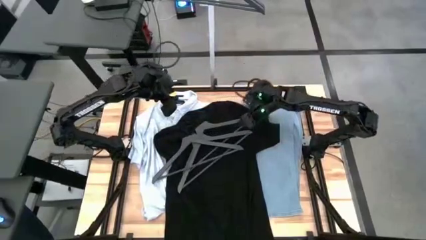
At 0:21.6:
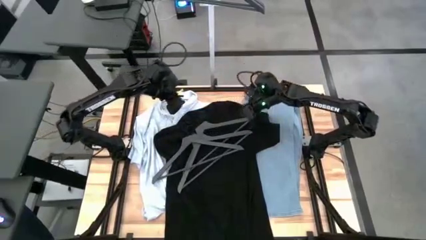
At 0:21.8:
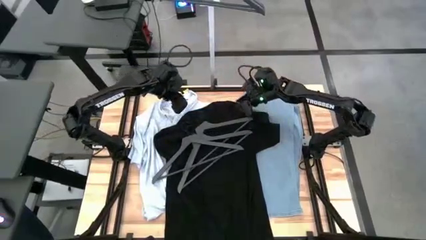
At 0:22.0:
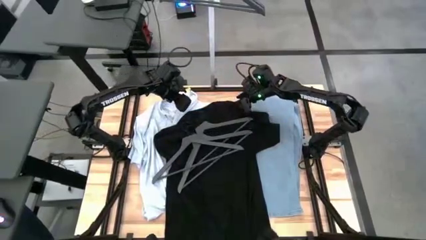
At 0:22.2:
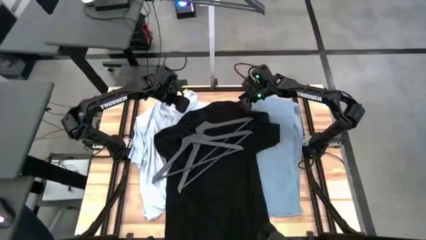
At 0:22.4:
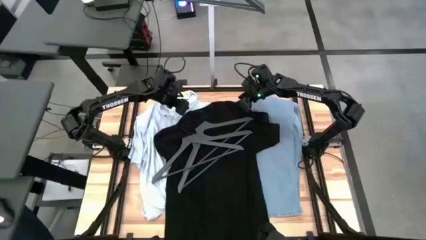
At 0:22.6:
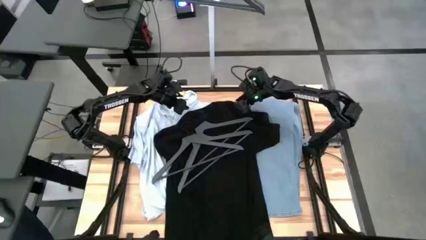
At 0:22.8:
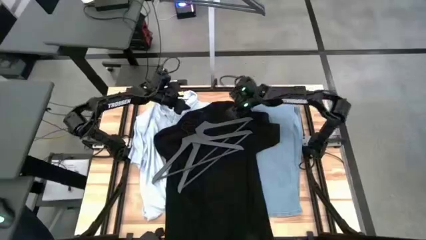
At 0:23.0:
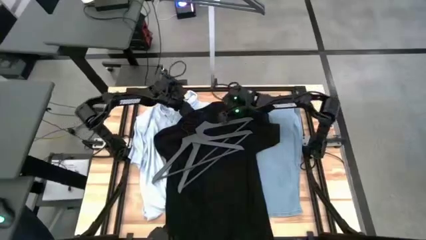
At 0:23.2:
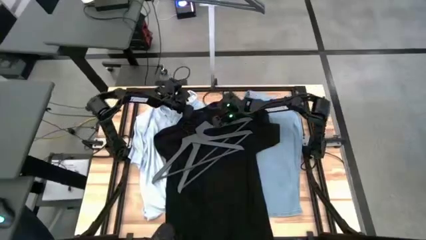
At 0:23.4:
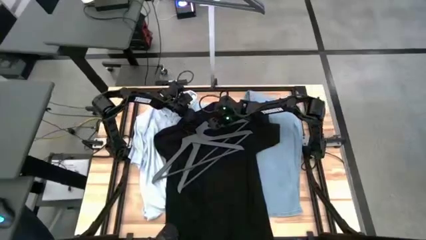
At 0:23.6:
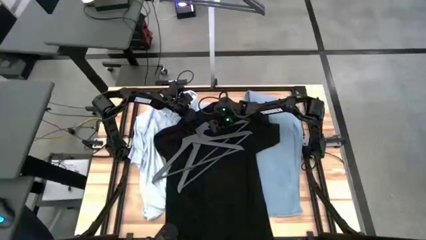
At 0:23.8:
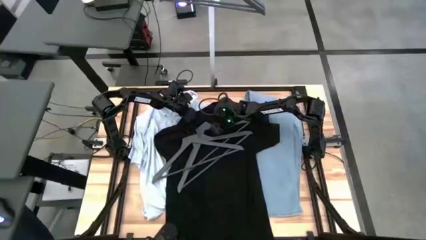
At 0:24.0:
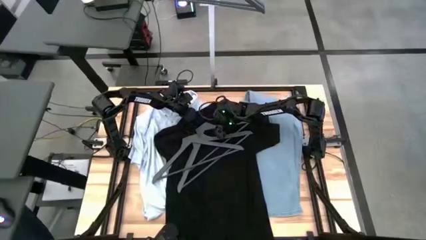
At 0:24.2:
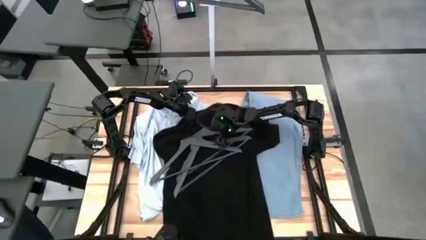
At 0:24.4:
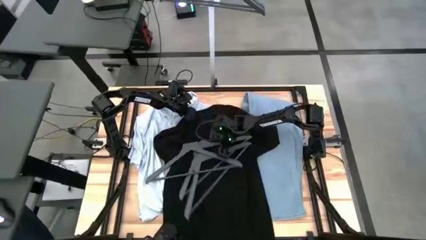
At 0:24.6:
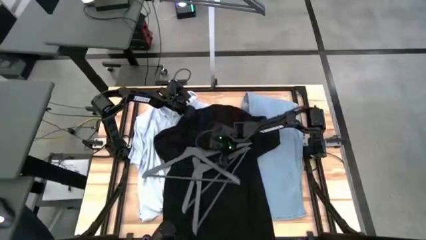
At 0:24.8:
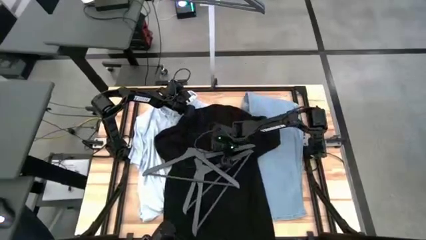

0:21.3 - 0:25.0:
Task: Hang clothes
Adjust the grey hangers

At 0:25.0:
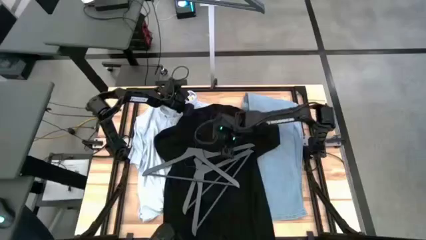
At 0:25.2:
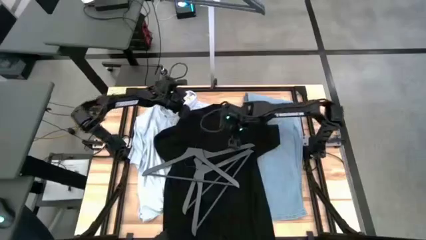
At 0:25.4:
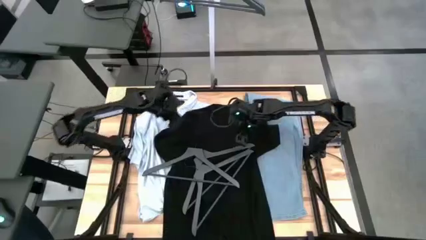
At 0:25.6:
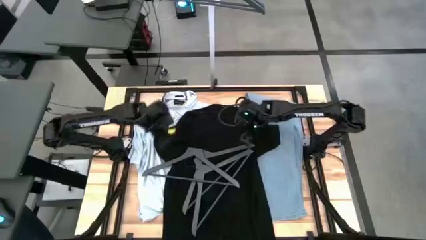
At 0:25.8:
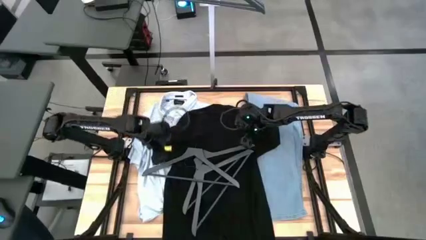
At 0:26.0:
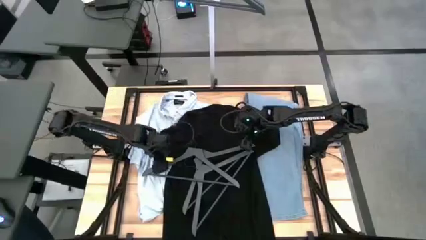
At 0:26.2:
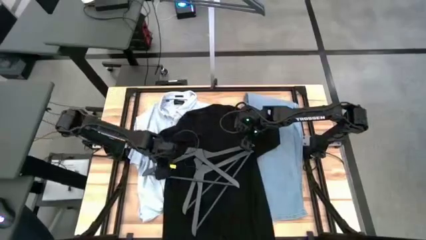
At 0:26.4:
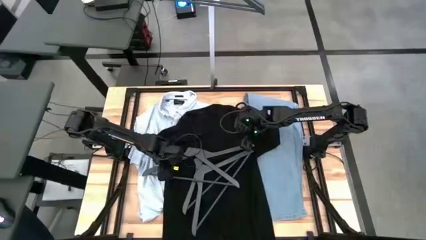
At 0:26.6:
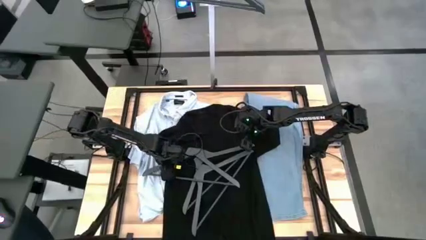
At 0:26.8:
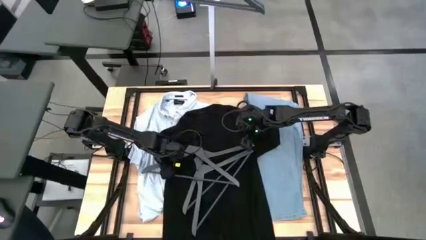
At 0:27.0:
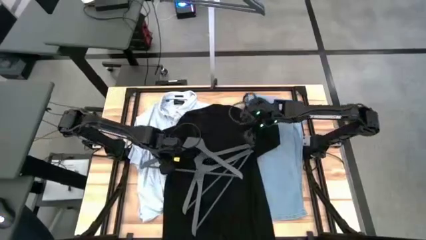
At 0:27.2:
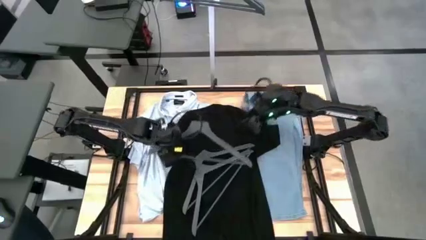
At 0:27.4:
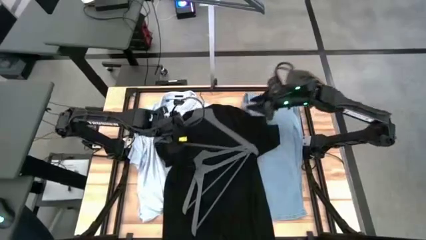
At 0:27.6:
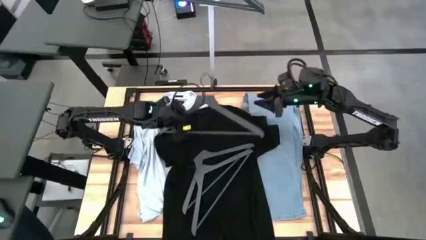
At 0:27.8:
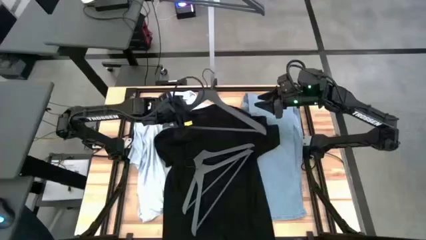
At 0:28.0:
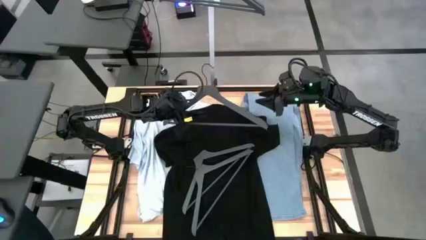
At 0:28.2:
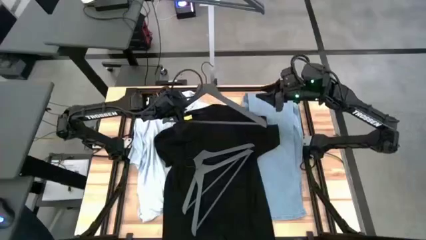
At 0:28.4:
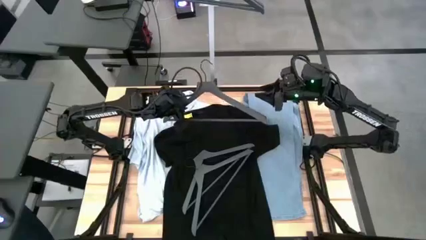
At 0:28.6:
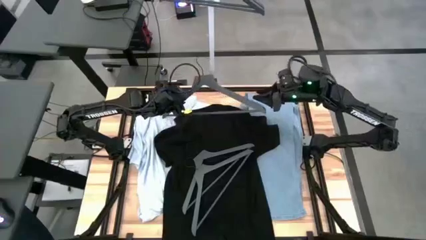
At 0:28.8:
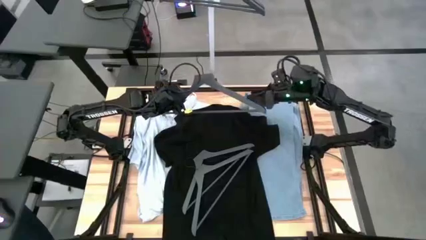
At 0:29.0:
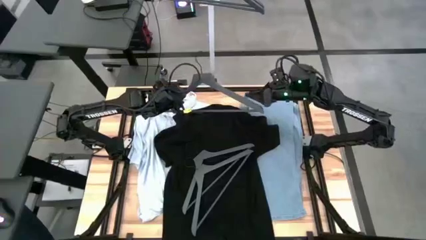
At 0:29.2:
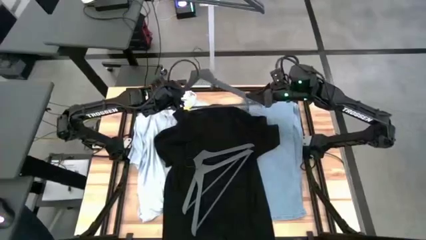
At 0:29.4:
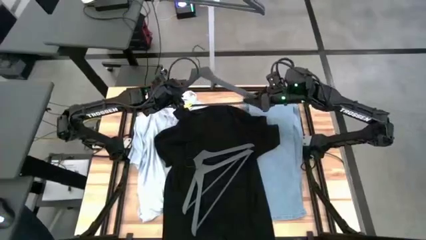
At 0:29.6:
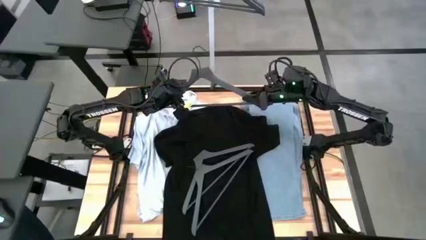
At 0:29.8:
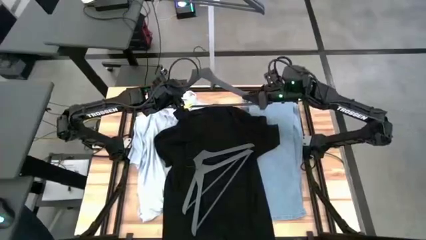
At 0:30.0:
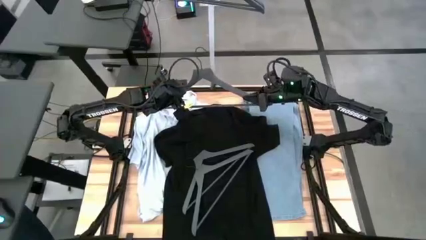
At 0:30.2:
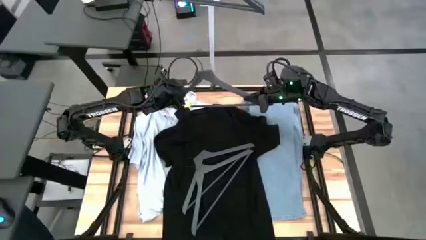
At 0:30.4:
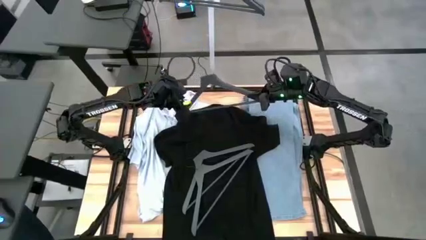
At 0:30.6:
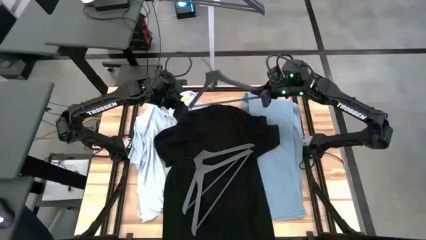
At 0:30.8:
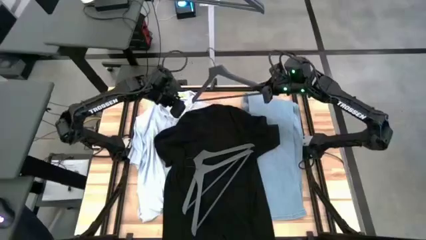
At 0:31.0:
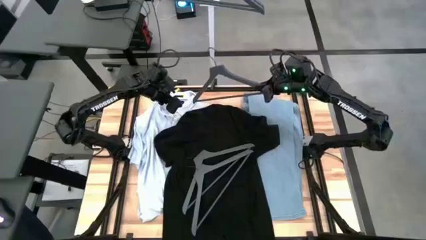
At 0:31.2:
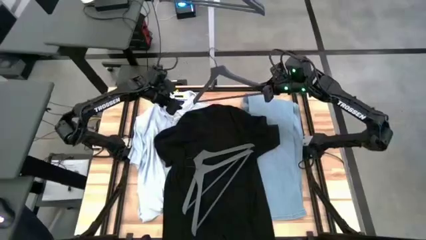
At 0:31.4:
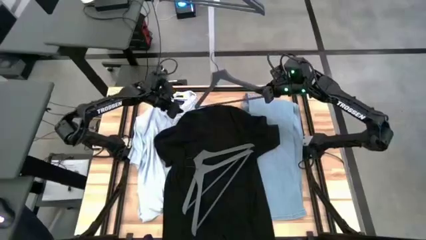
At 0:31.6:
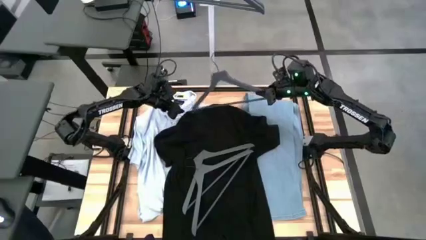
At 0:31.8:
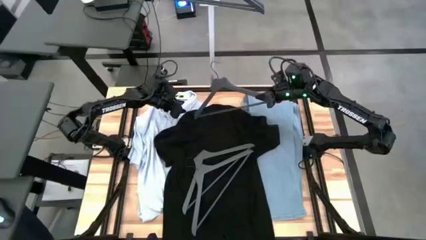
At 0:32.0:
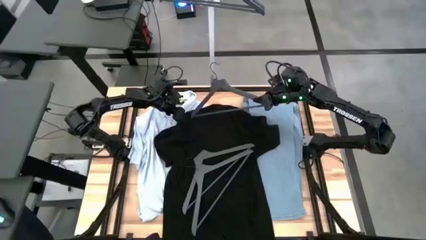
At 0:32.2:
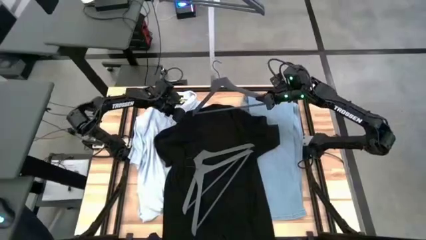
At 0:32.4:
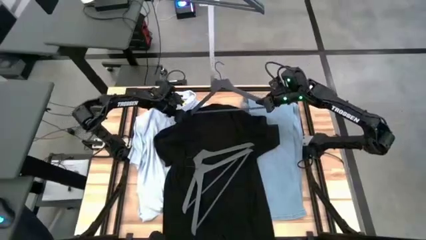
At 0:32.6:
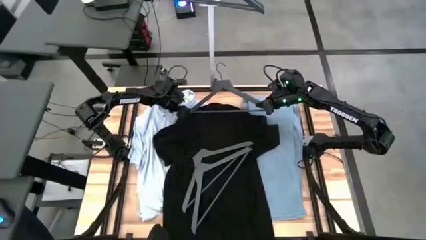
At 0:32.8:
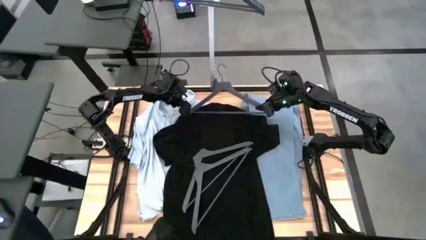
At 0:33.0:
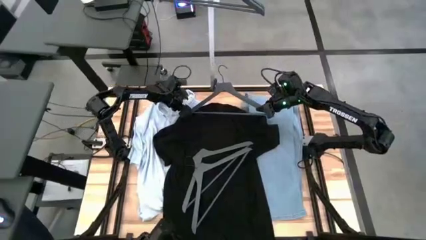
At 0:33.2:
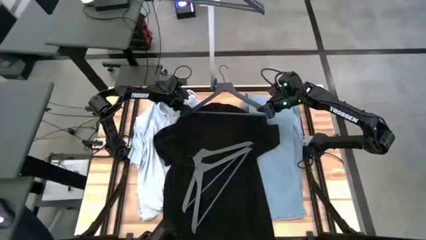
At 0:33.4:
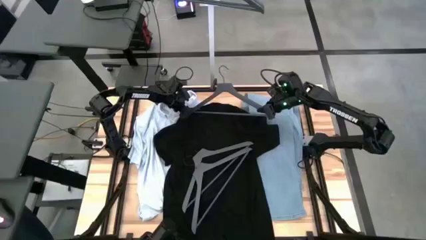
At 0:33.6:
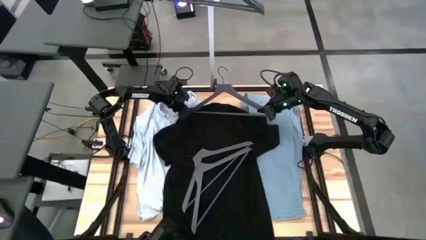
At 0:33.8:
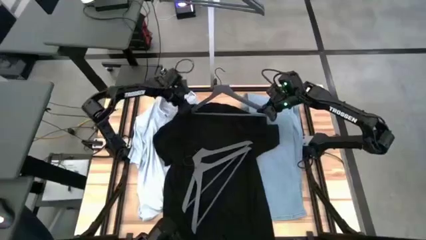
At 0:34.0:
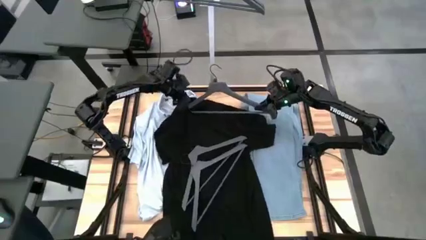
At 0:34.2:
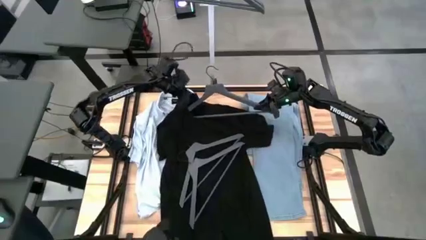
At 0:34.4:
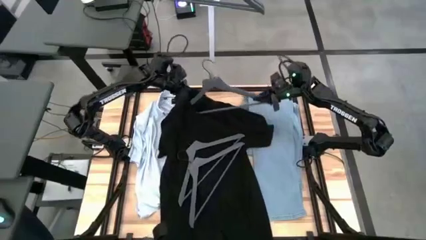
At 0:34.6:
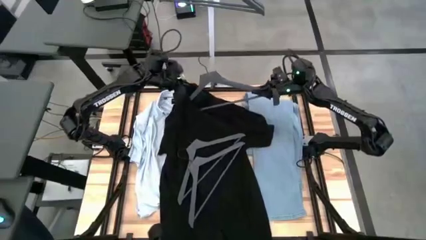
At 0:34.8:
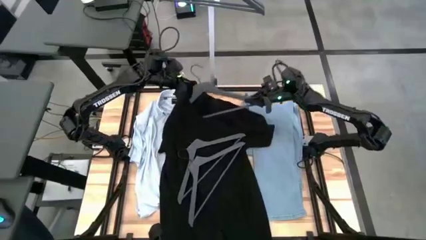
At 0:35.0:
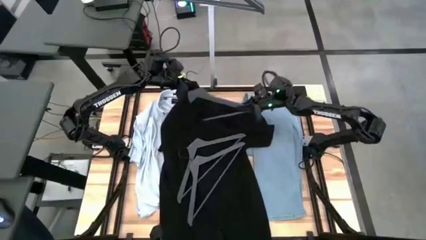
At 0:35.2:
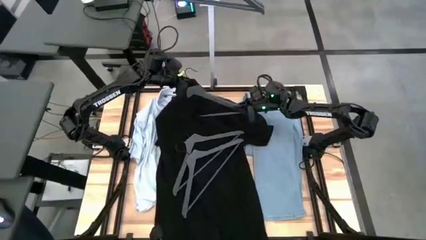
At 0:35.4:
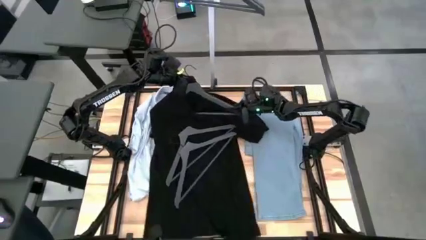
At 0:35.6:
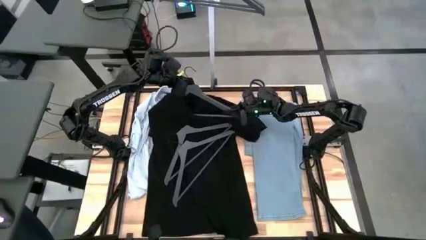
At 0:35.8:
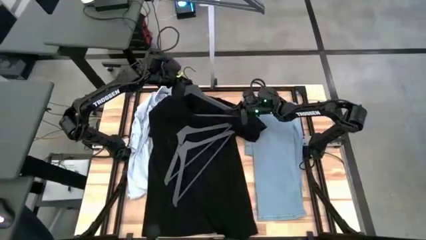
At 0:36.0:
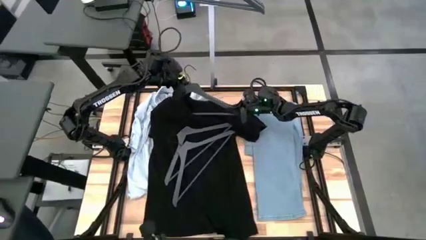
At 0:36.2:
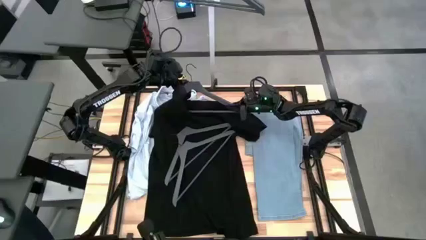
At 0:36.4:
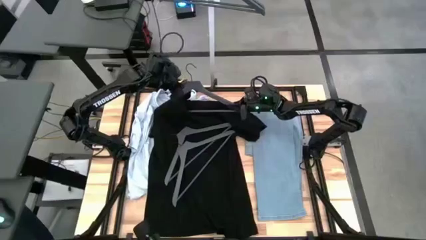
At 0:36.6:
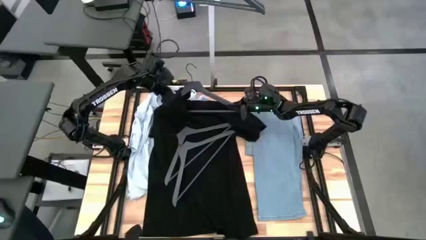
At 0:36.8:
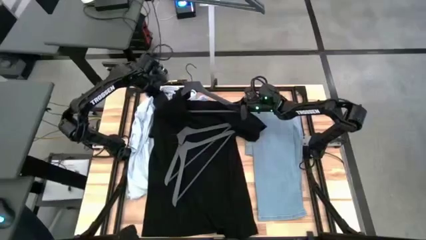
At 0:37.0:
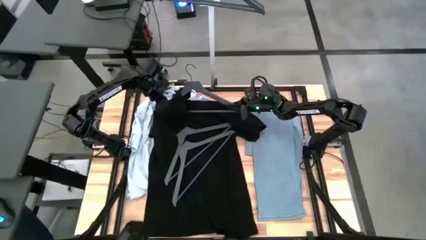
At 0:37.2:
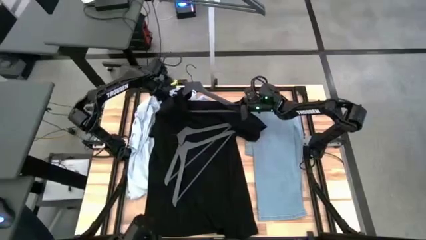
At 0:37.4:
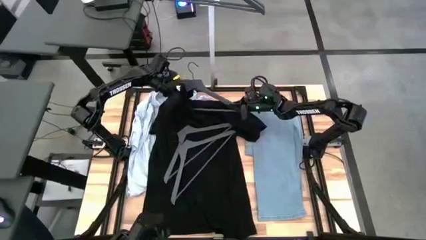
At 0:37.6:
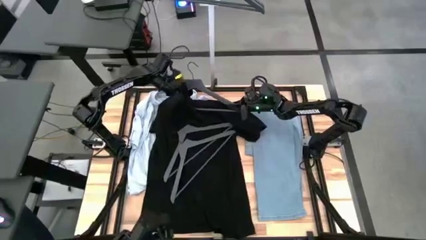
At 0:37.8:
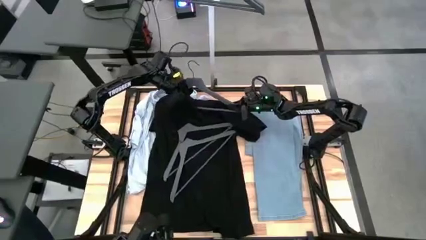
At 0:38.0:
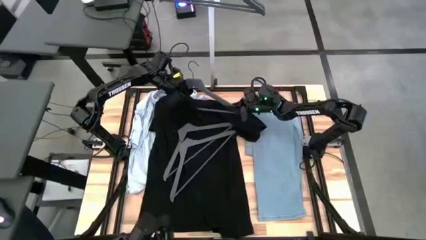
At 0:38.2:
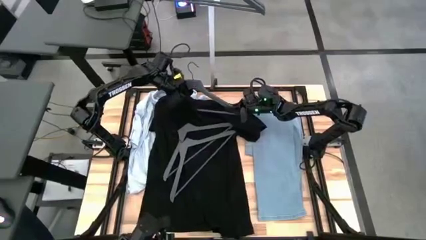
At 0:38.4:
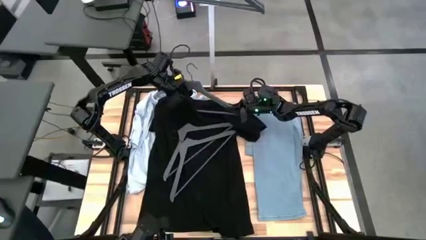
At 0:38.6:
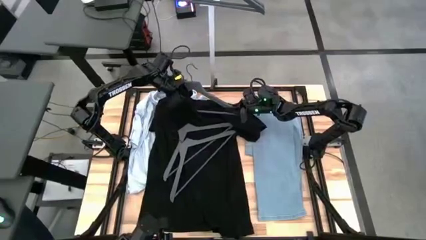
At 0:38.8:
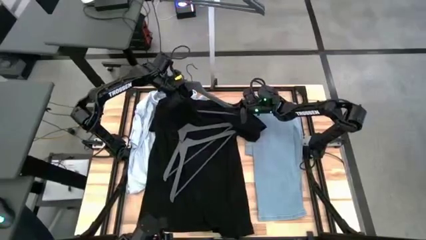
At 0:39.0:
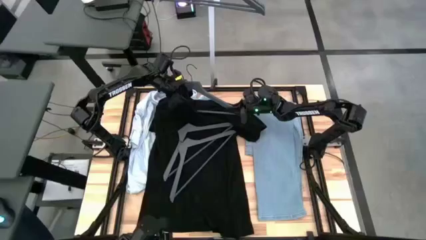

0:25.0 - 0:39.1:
Insert the black shirt on the grey hanger
